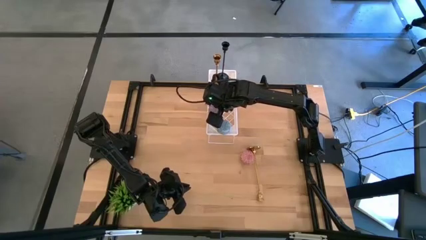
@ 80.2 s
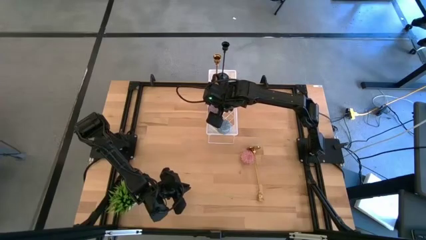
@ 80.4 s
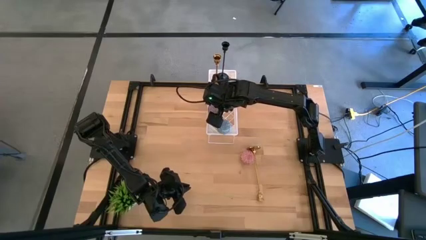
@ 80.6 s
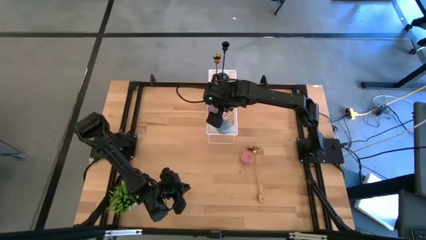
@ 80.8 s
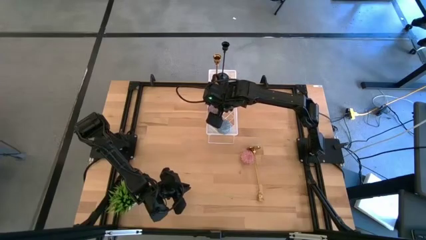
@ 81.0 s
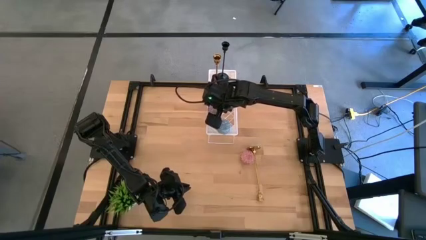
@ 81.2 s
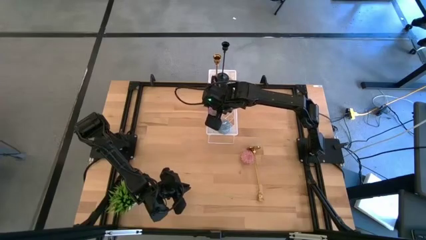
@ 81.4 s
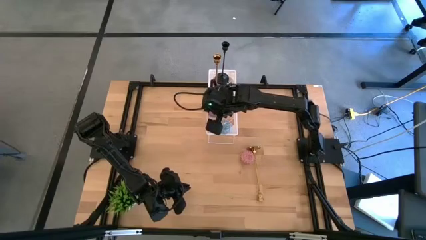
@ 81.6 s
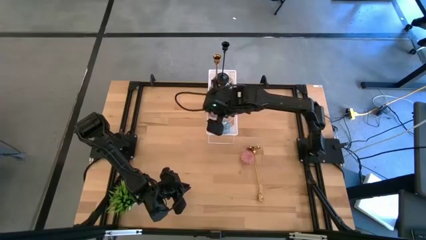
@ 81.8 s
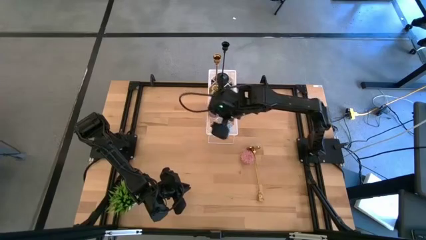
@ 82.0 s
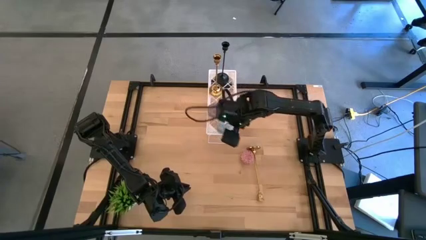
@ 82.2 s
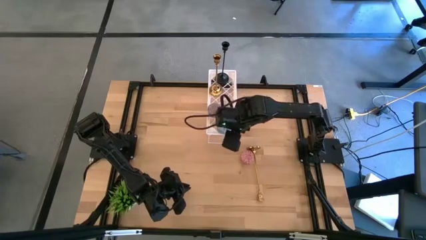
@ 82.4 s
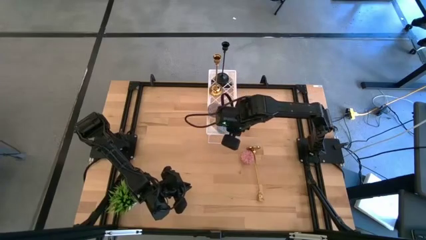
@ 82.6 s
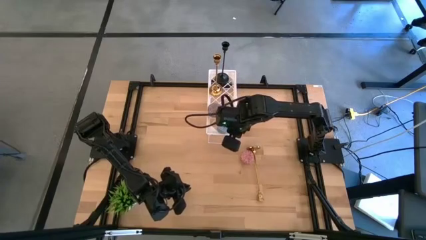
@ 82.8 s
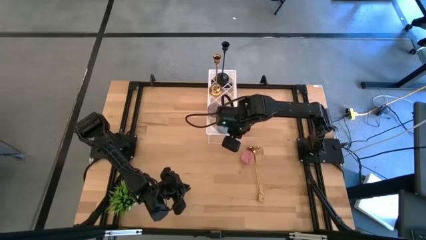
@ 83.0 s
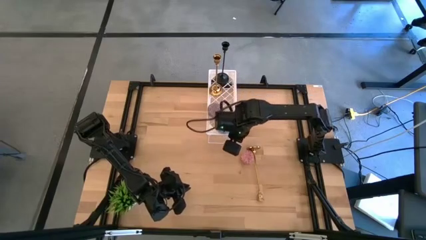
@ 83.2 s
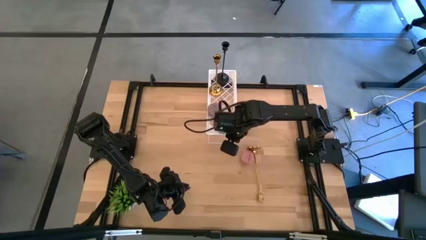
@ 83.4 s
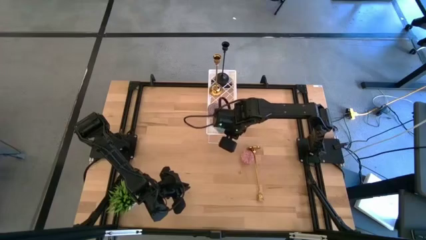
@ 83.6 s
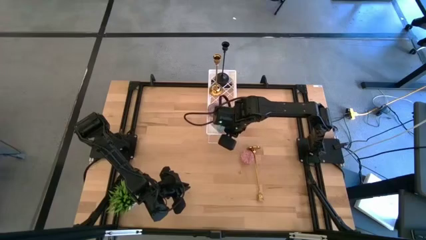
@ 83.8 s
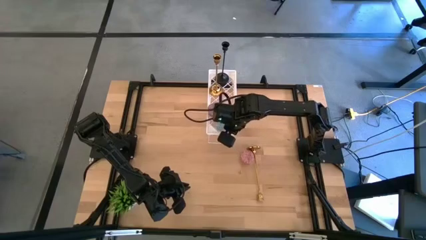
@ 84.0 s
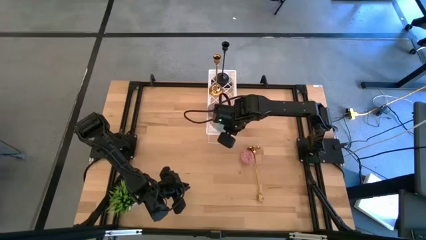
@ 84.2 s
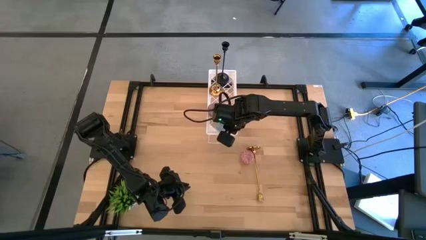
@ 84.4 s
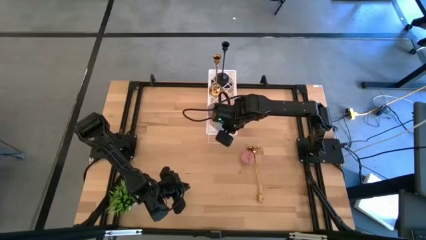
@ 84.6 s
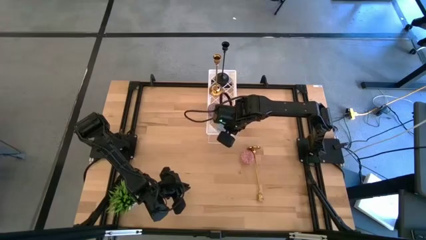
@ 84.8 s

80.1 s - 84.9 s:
Task: Pick & Place candle stick holders
Adjust the blue scented candle holder on the shelf

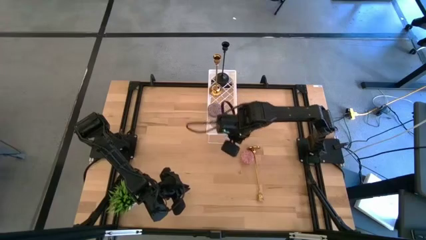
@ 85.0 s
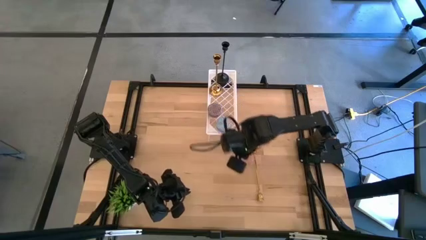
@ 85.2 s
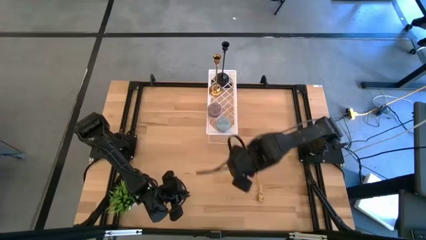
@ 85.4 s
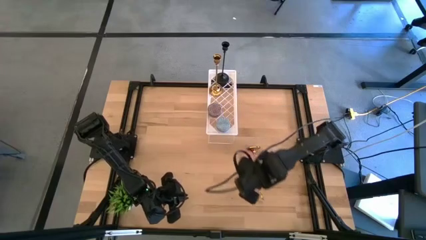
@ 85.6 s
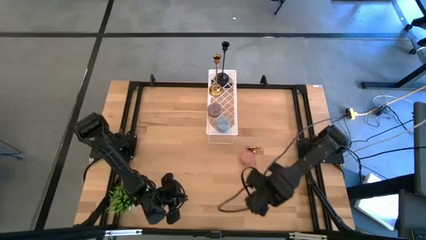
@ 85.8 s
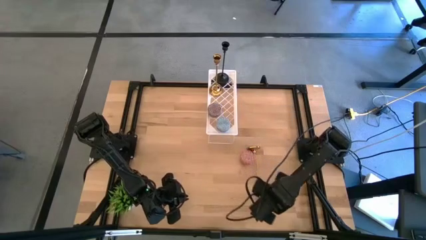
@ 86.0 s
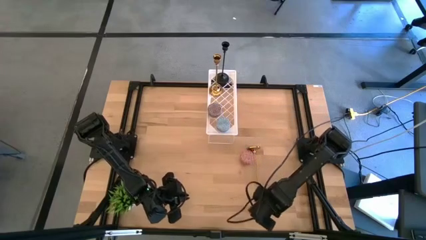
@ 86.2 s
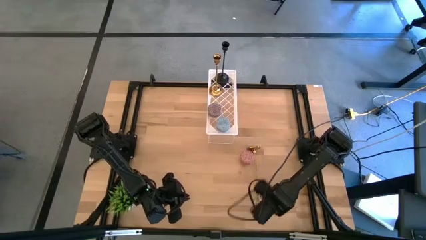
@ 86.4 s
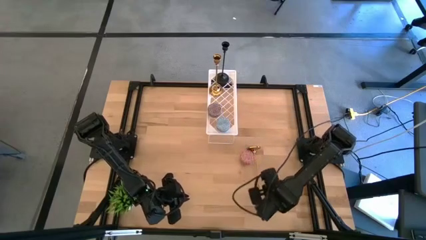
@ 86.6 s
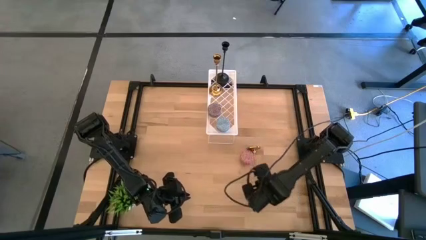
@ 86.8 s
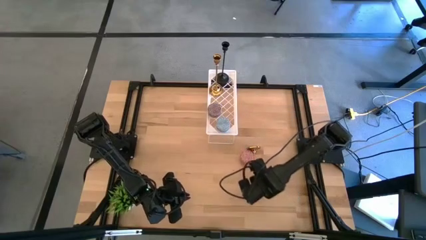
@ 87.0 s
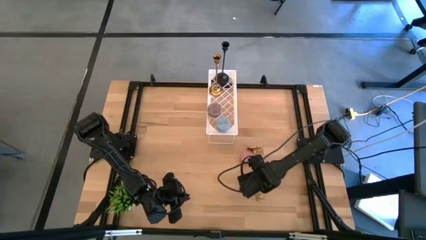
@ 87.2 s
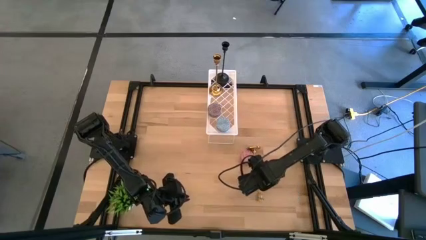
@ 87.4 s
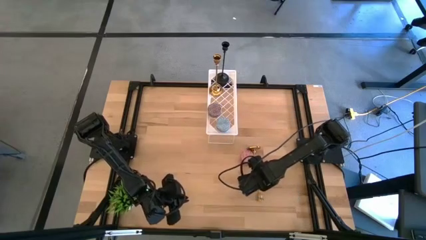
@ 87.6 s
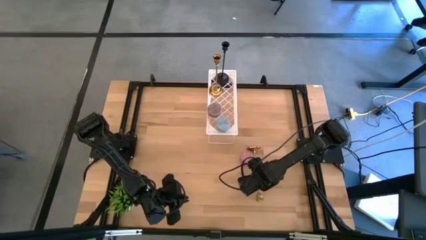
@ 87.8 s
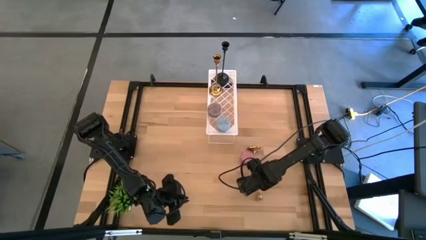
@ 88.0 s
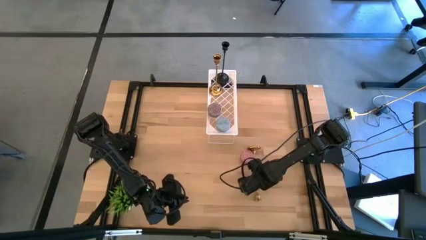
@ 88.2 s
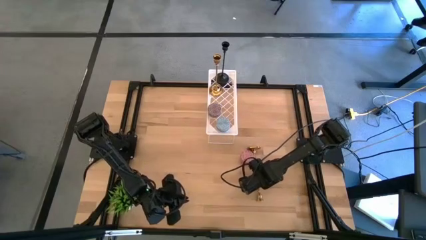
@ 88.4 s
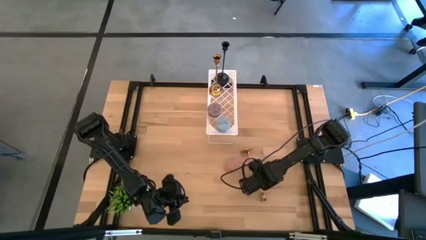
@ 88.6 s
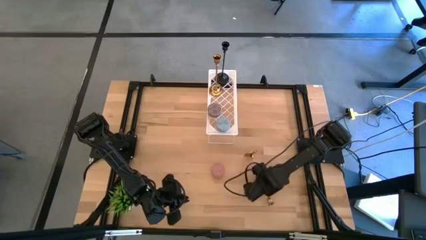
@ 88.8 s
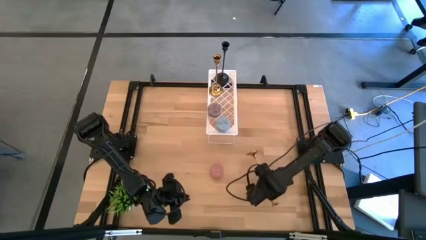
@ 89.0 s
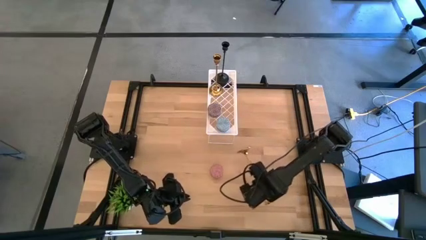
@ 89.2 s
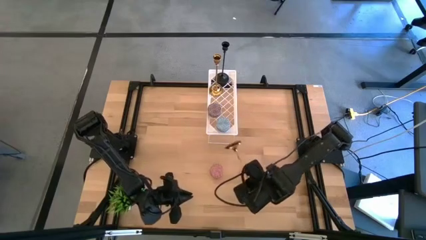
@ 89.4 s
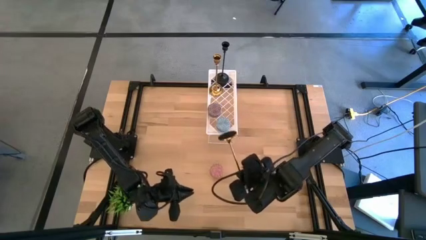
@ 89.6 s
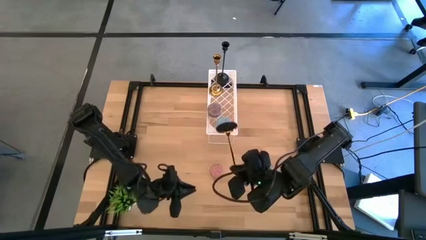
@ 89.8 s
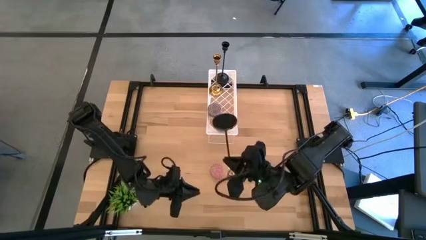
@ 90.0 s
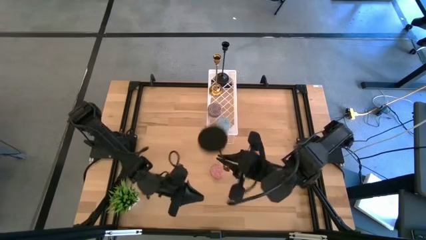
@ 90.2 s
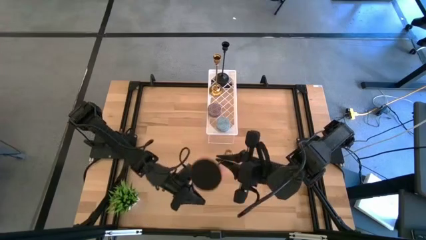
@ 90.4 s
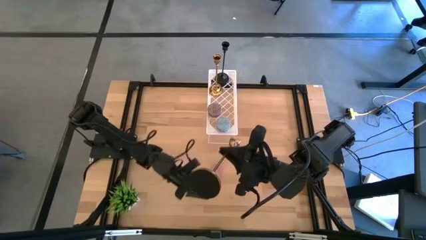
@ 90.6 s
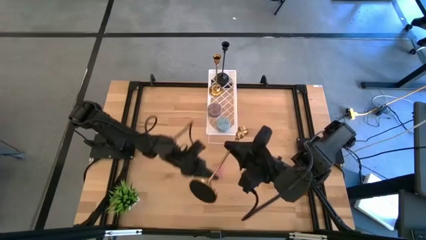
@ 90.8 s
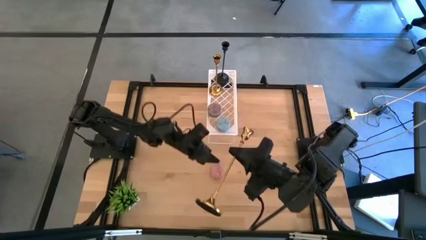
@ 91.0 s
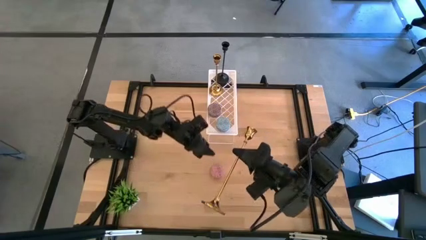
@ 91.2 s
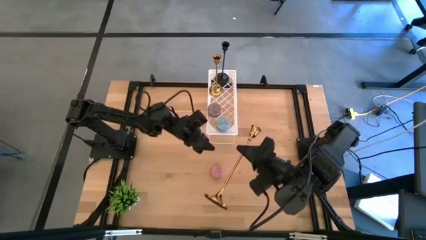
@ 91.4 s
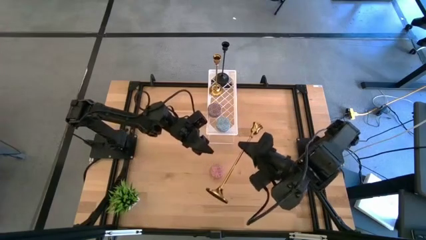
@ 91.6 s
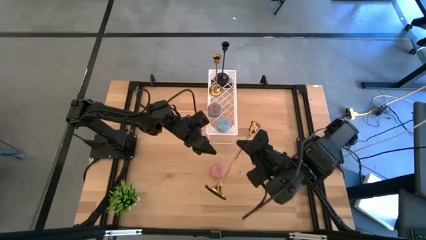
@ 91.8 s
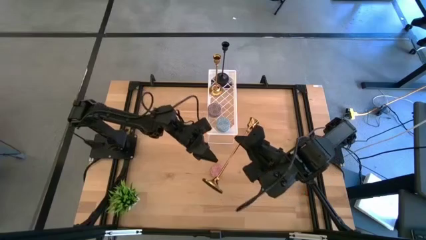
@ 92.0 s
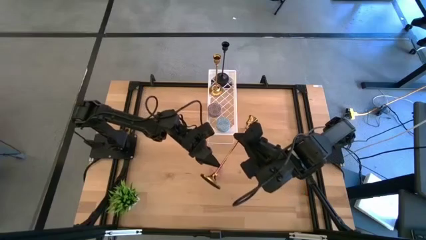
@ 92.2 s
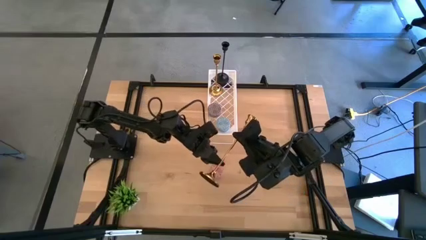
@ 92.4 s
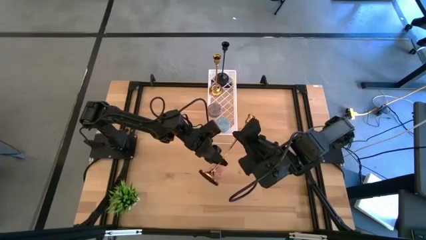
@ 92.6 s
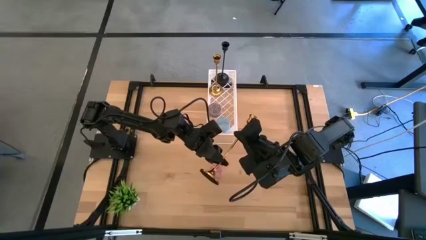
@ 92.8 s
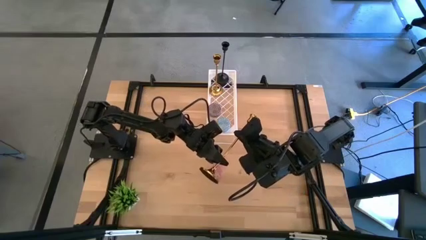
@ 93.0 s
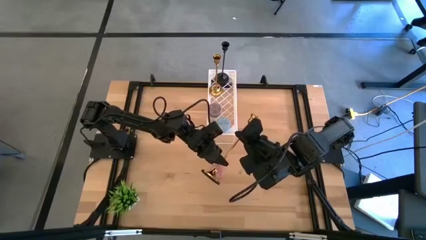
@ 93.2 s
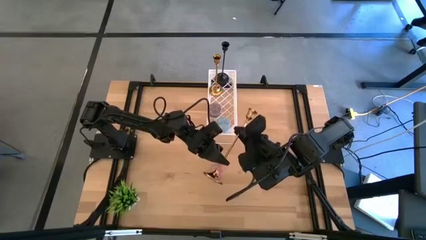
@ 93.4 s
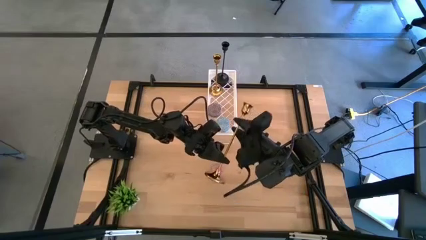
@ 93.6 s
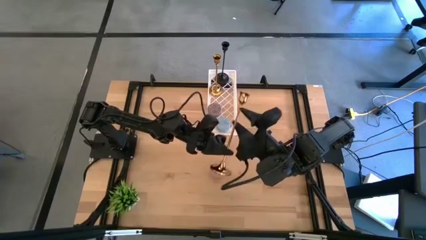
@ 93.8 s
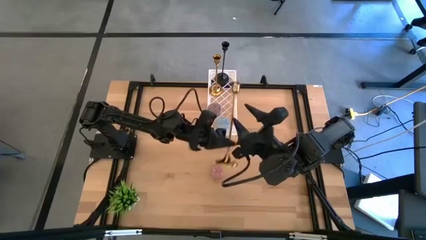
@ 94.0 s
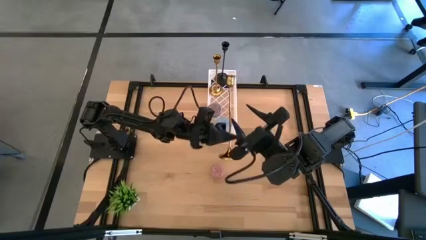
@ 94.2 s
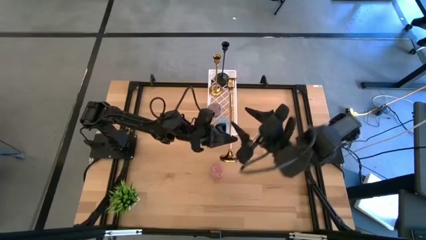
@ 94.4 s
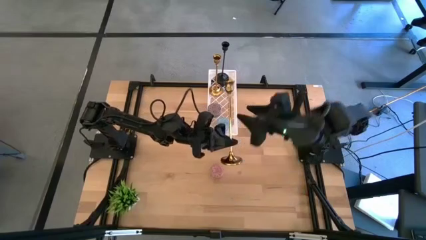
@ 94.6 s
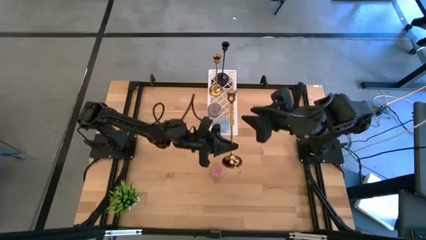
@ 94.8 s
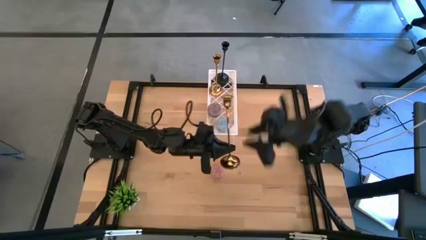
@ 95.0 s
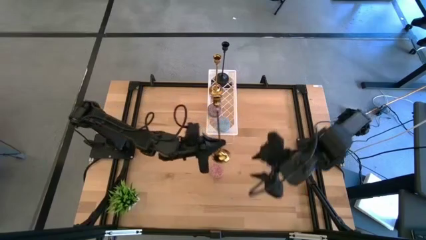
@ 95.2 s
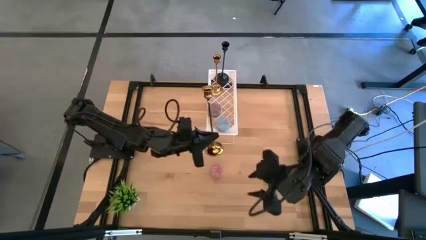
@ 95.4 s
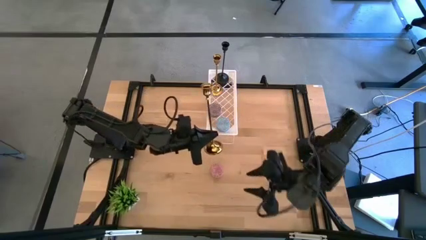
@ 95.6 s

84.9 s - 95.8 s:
Put the gold candle holder on the shelf
